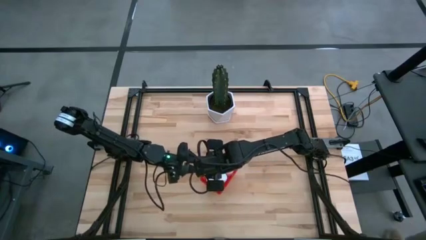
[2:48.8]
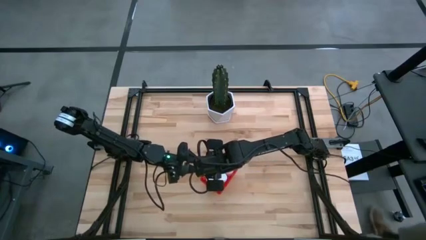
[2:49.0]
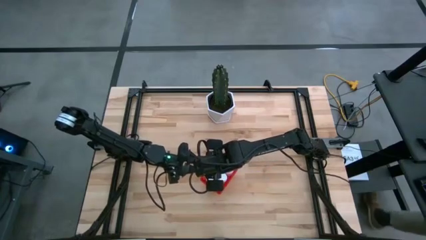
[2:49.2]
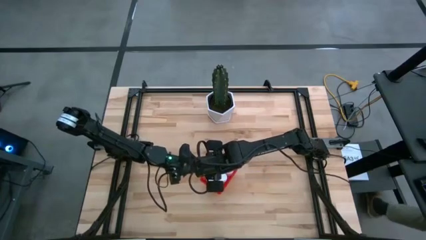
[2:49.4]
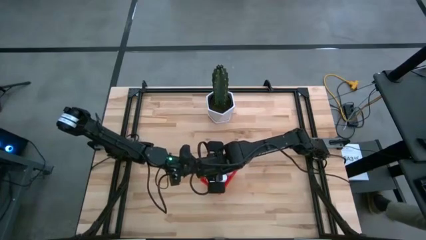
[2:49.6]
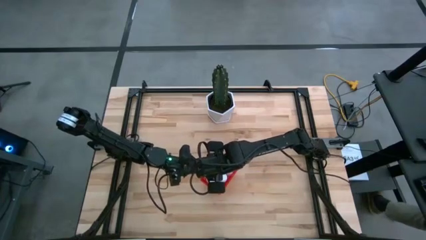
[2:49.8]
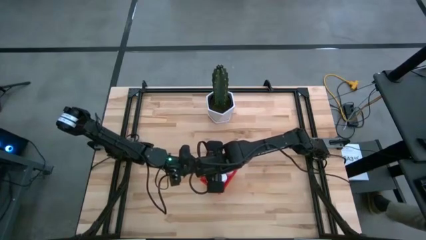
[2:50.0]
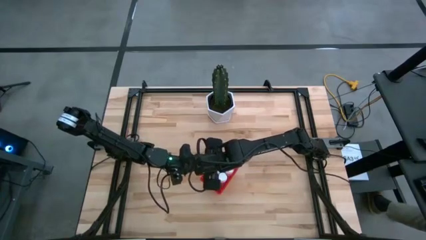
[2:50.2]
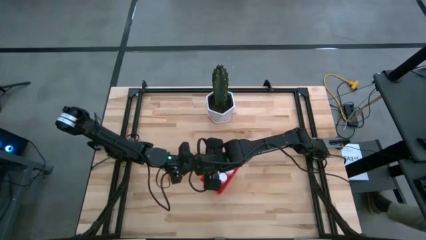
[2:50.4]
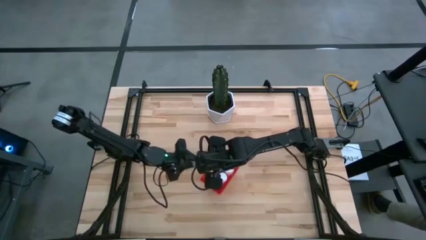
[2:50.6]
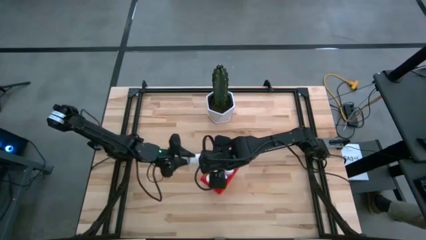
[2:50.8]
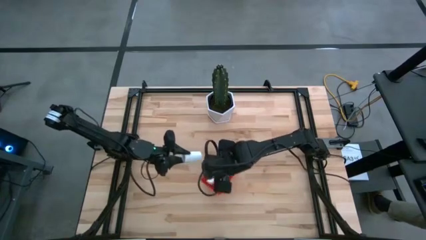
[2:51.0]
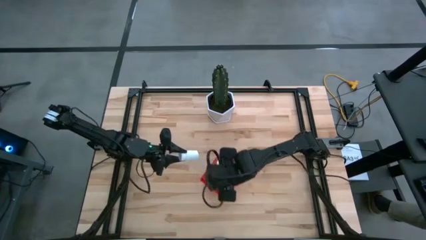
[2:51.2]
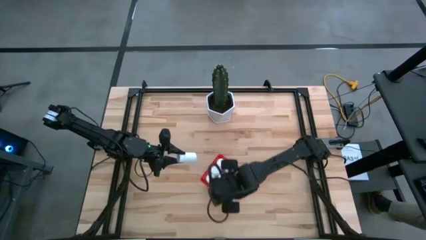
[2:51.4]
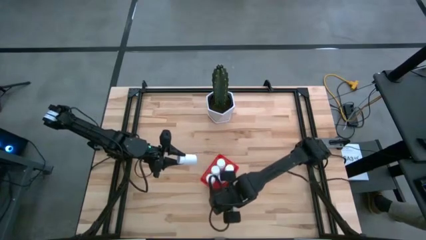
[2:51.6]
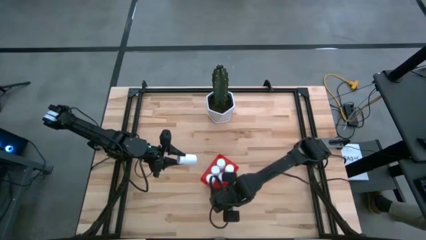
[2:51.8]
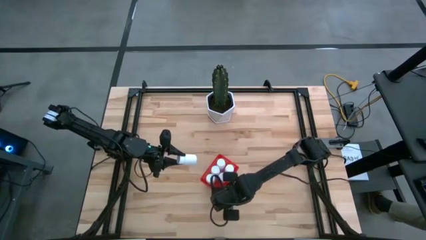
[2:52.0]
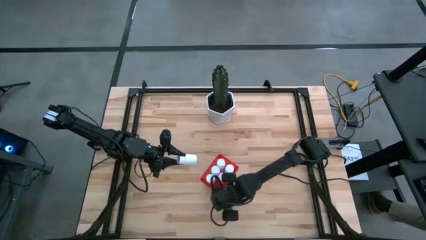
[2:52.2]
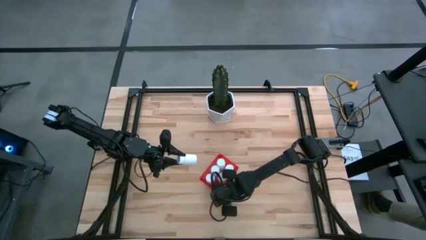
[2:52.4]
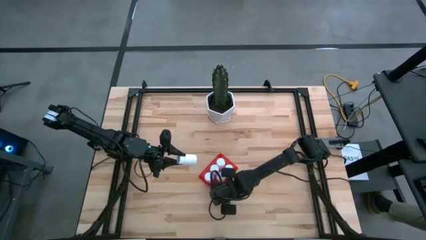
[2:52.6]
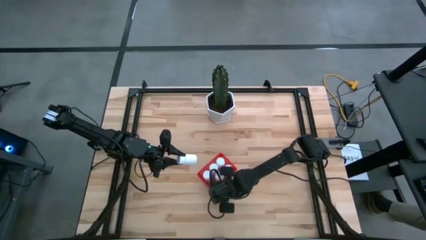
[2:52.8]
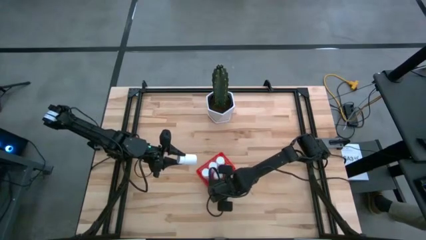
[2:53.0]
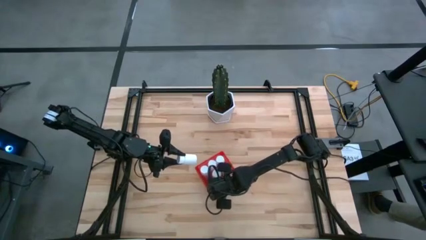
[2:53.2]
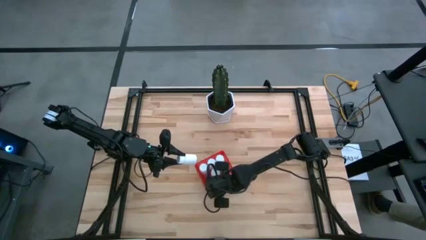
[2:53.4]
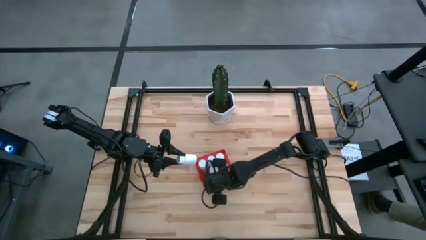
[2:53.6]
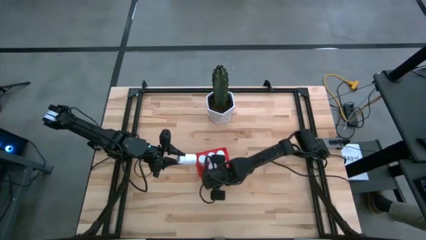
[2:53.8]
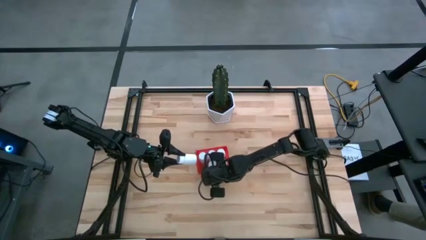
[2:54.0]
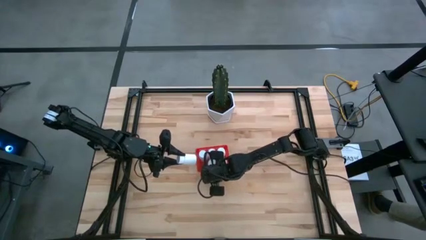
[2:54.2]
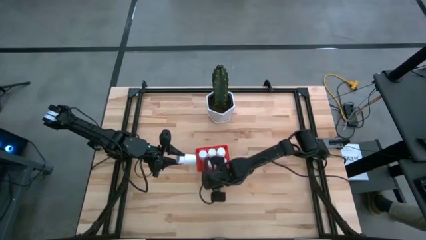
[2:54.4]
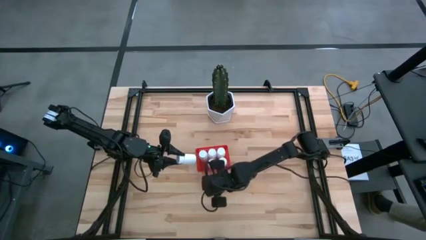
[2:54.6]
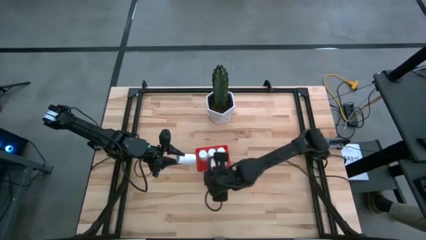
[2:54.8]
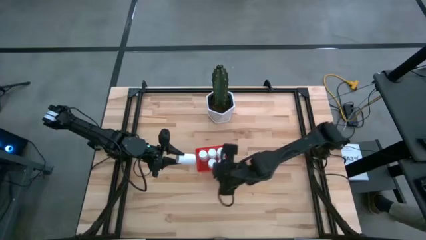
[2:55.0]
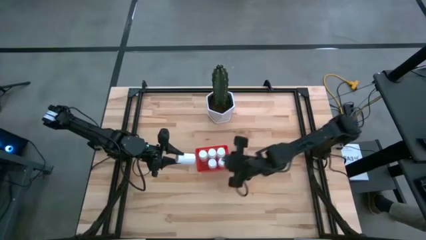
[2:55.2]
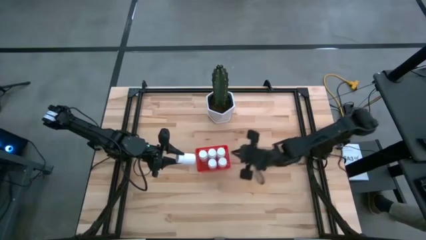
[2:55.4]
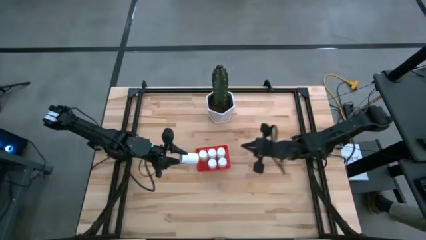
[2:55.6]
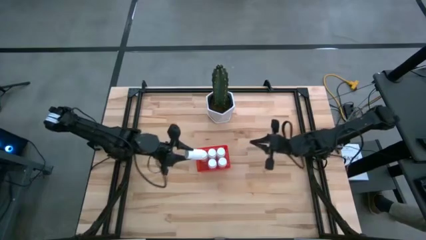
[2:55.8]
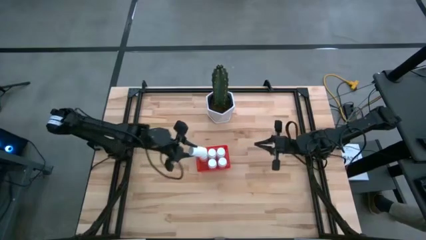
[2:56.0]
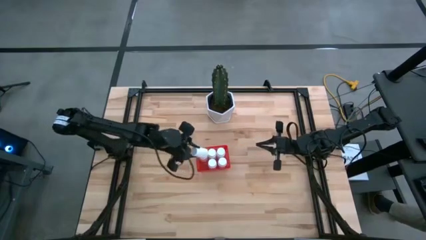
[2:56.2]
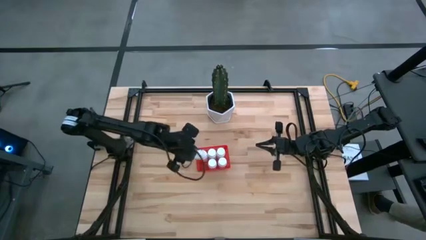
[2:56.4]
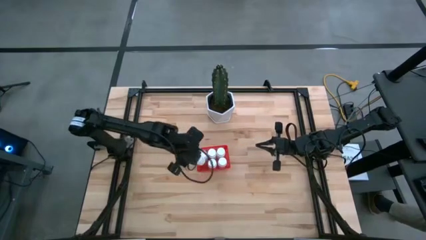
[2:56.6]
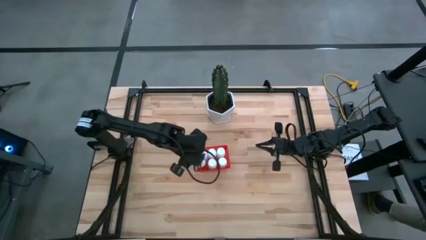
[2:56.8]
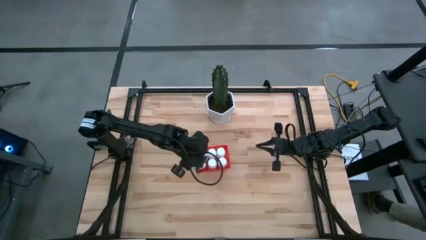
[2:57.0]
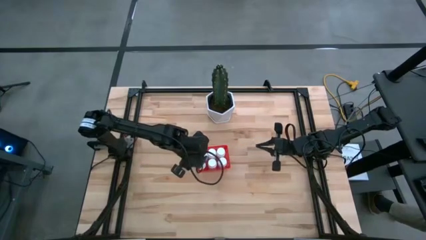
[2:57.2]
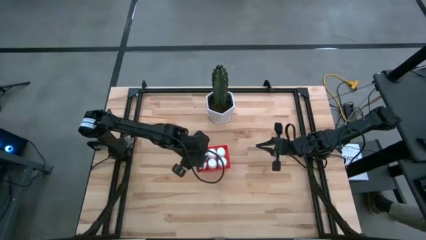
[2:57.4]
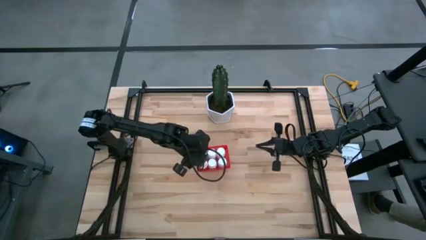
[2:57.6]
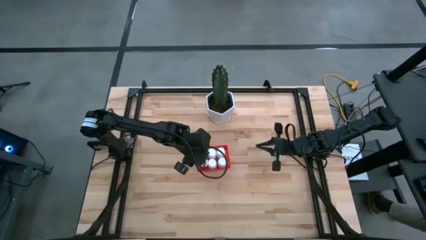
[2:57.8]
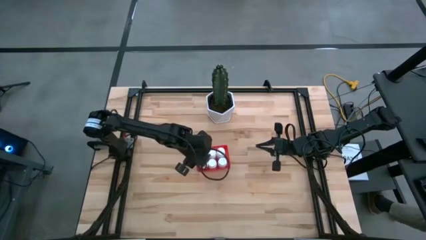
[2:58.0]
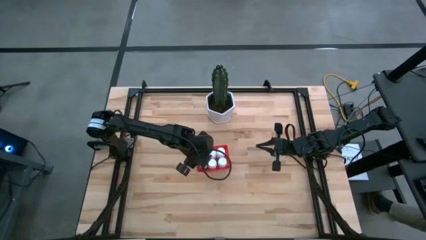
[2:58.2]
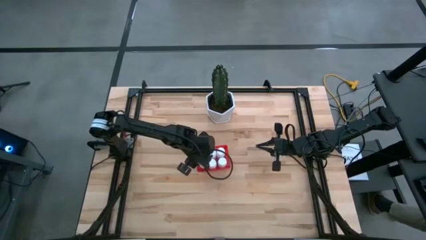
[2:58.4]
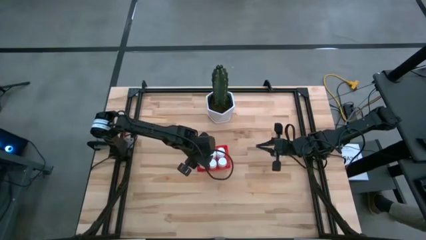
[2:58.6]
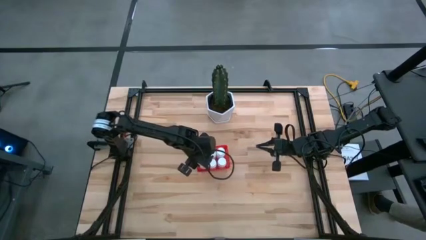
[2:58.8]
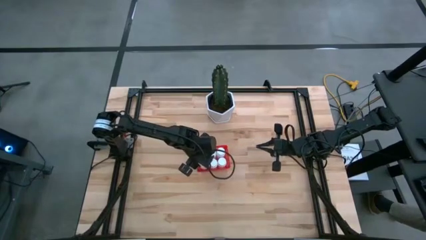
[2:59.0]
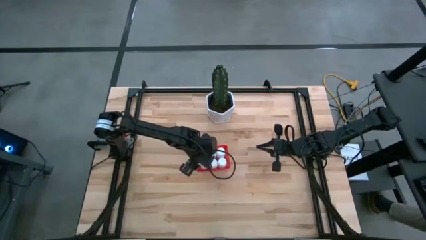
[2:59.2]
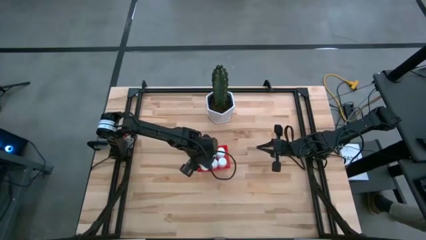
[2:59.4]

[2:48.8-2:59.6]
Task: Pick and place pill bottles into a basket
Put the white pill bottle into the red bin

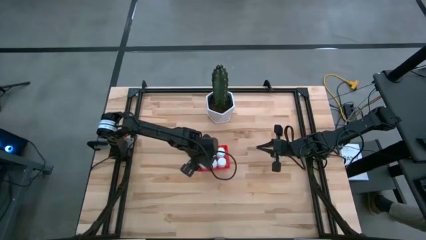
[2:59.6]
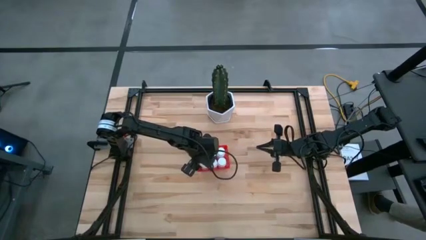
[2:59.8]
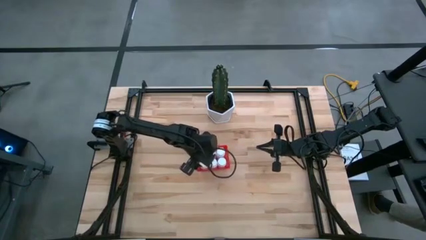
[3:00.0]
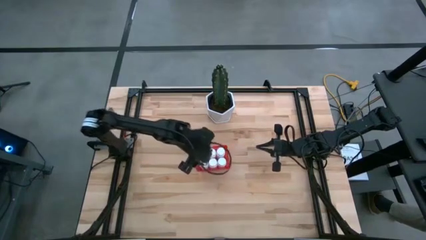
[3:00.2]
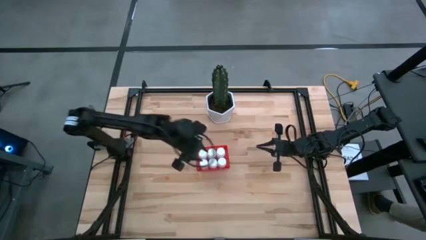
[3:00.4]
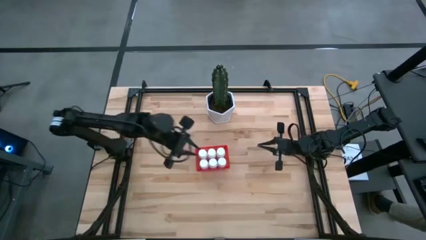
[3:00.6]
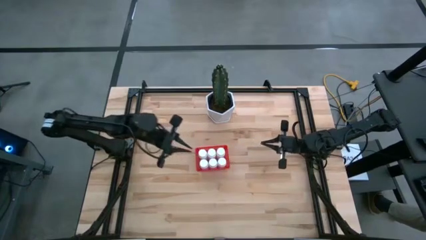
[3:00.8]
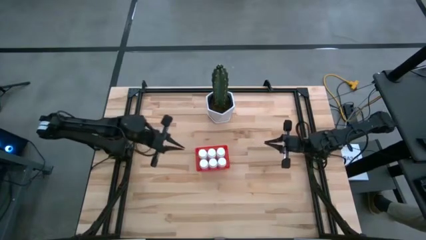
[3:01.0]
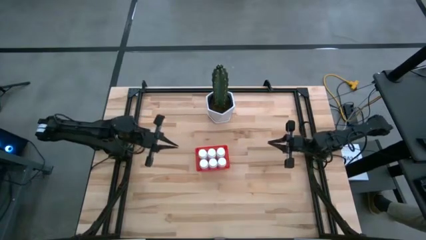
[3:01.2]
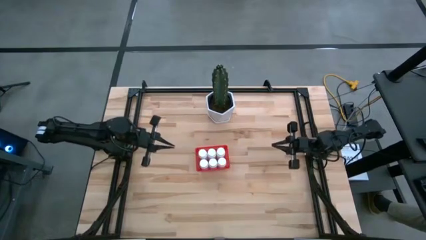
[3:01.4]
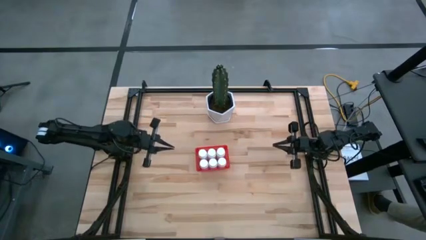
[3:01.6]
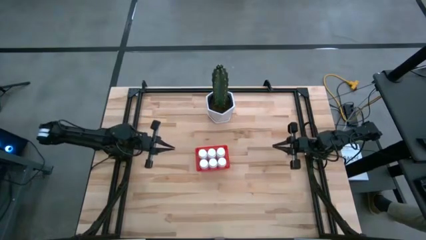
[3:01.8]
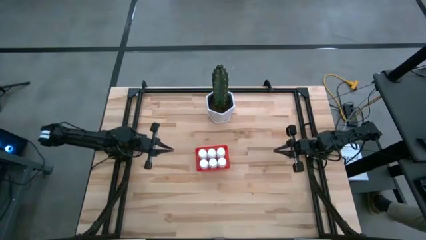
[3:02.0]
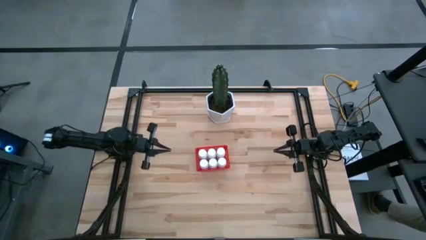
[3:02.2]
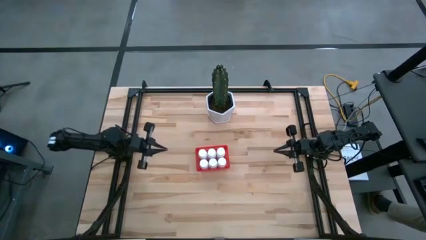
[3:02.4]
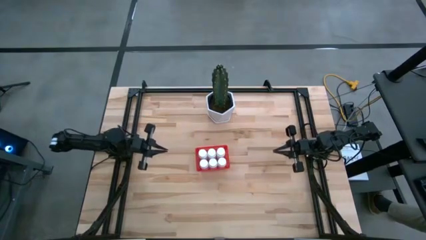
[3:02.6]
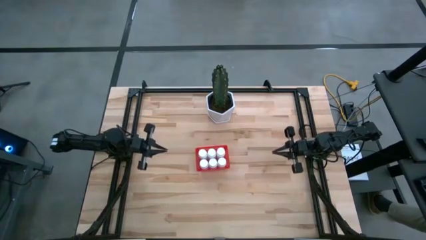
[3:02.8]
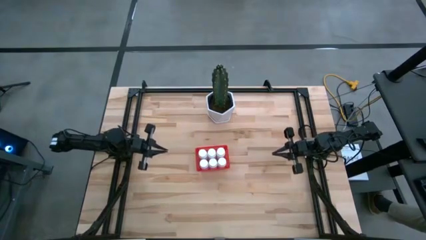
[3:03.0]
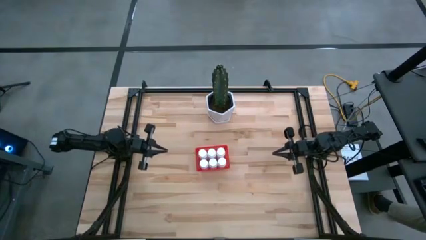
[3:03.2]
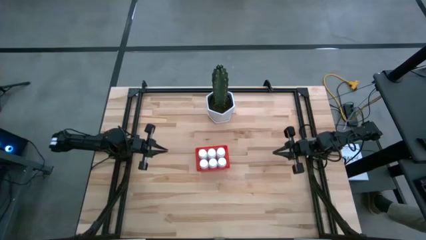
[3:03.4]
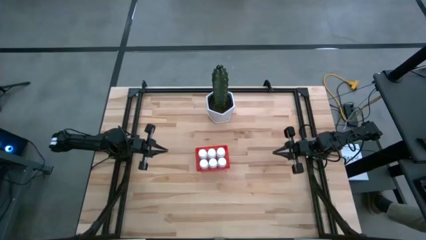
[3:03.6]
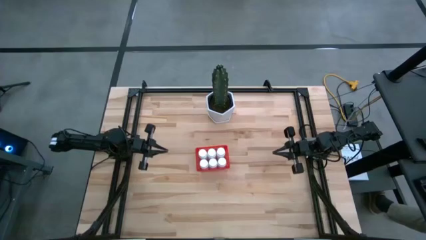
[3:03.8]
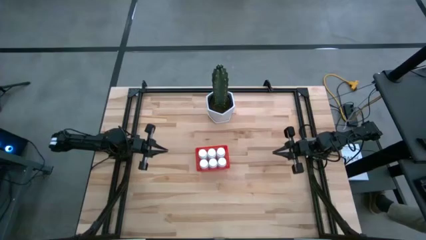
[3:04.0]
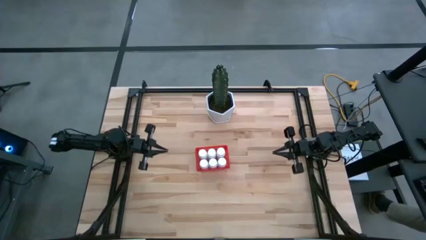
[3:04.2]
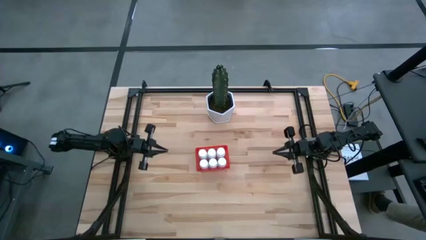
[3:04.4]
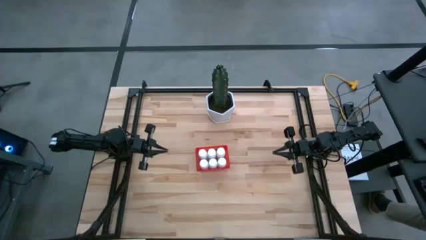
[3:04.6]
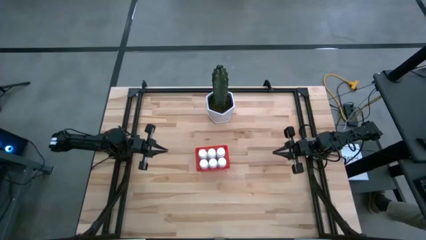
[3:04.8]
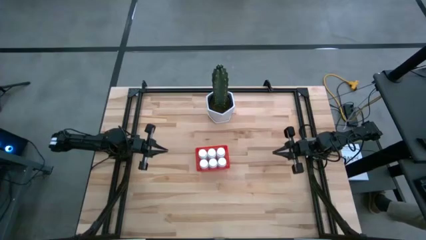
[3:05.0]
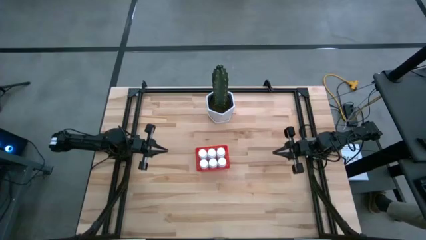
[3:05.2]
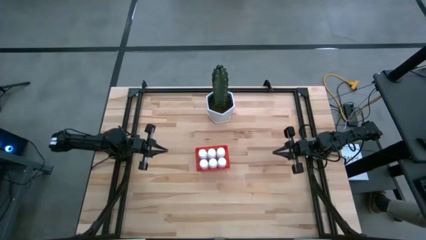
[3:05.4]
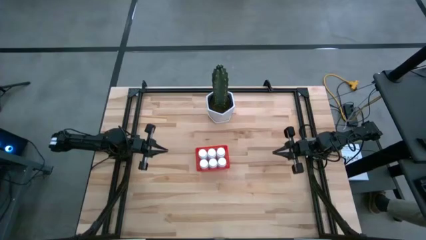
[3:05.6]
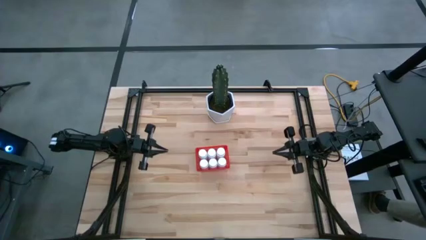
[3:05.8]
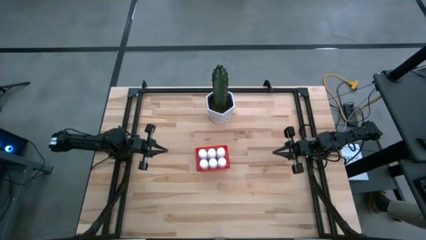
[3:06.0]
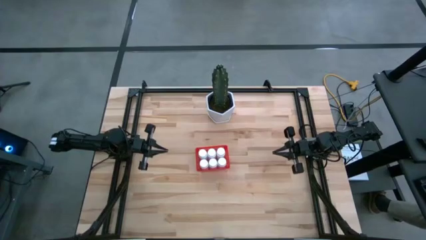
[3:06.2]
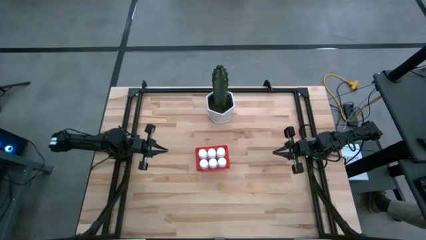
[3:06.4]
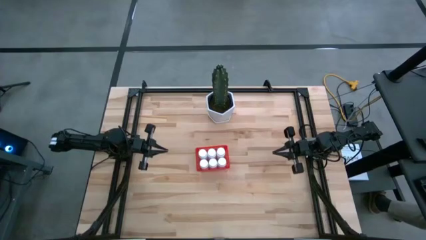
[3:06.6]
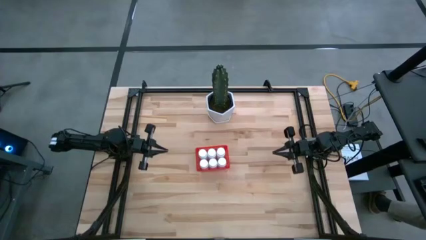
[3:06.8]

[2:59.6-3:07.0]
Return to Home Position
